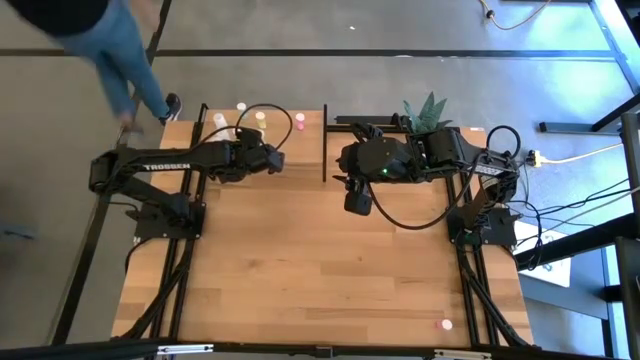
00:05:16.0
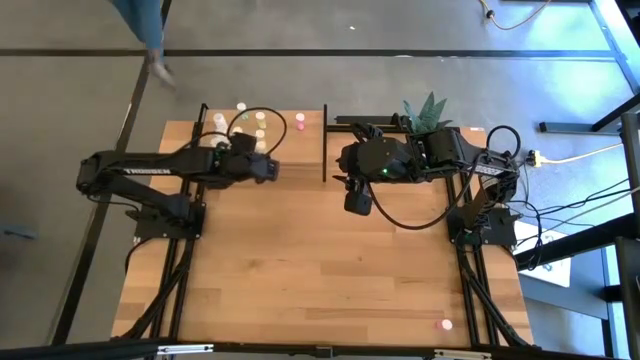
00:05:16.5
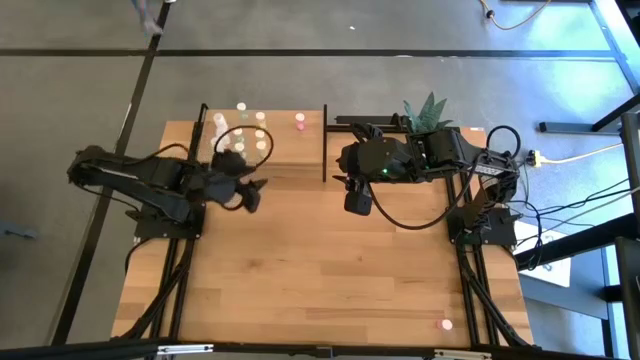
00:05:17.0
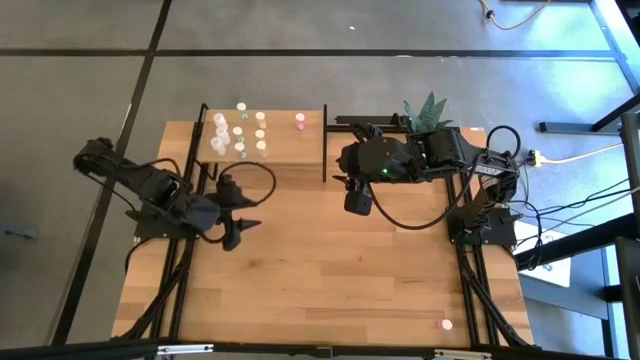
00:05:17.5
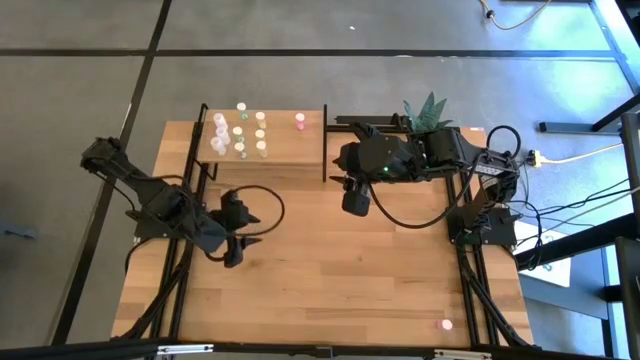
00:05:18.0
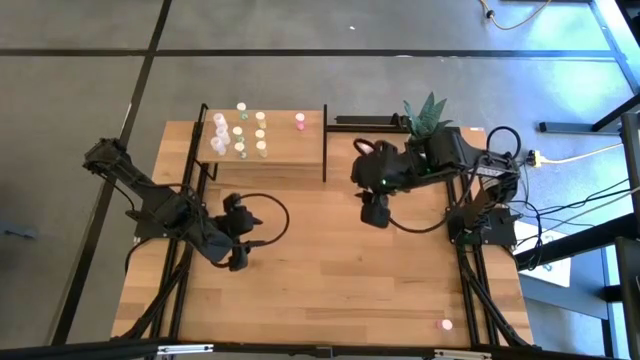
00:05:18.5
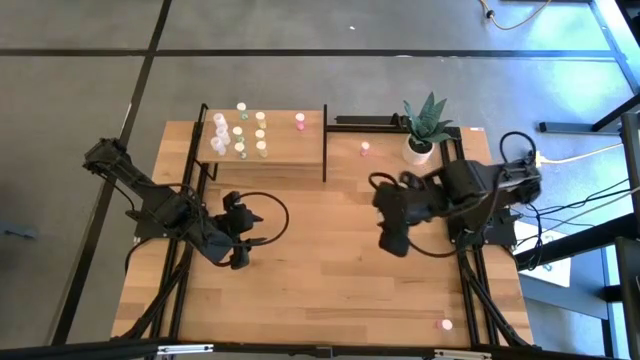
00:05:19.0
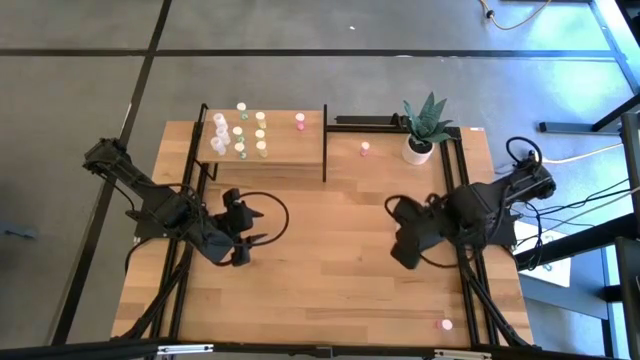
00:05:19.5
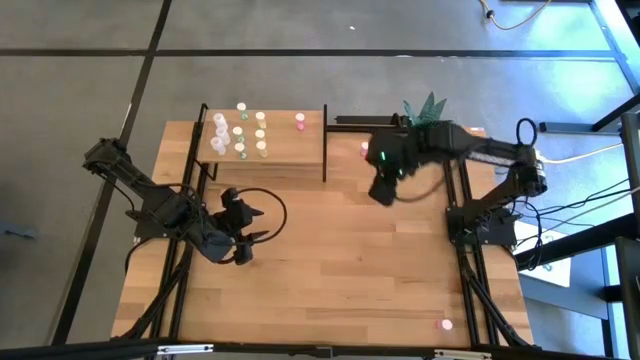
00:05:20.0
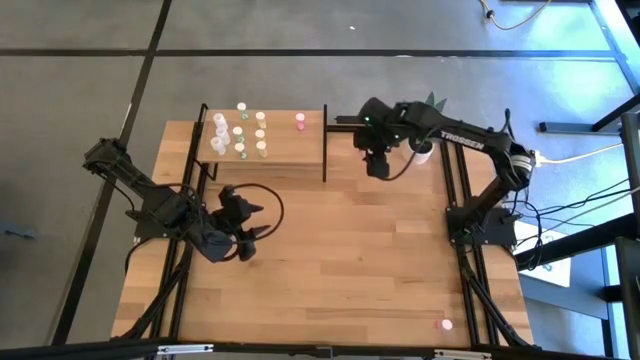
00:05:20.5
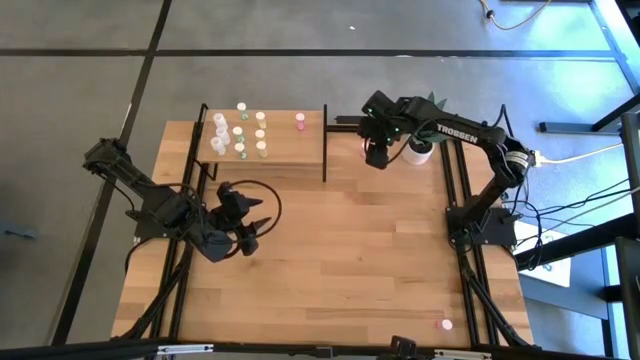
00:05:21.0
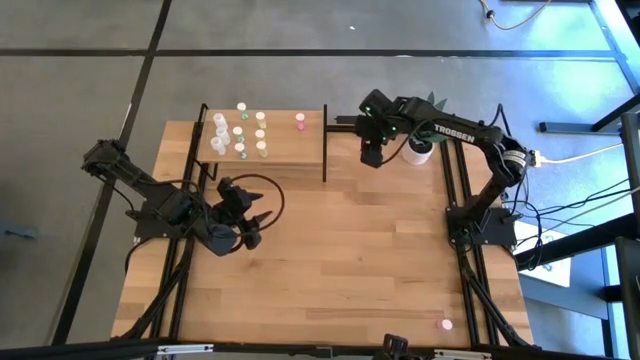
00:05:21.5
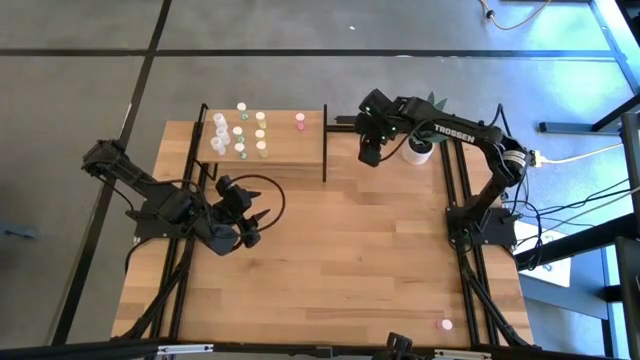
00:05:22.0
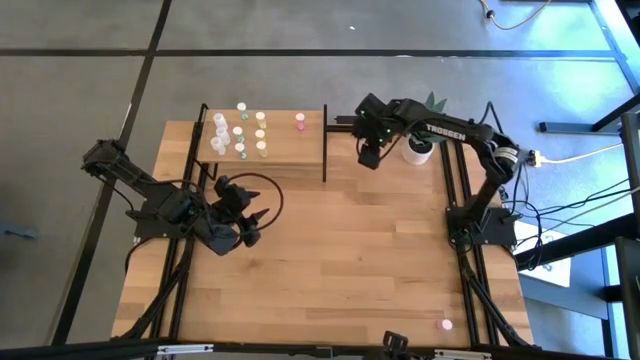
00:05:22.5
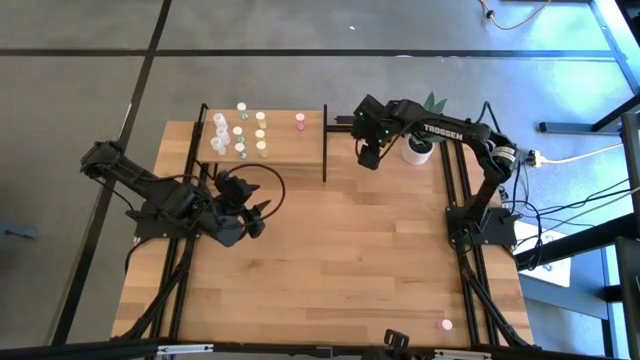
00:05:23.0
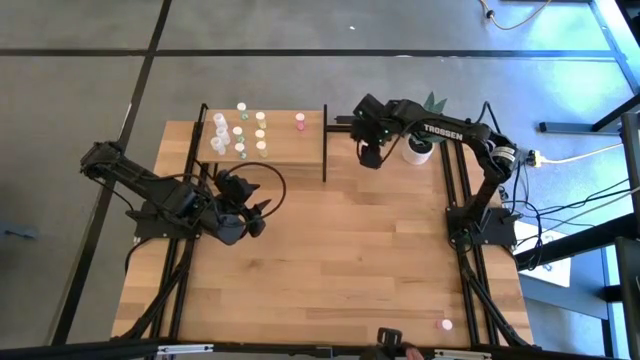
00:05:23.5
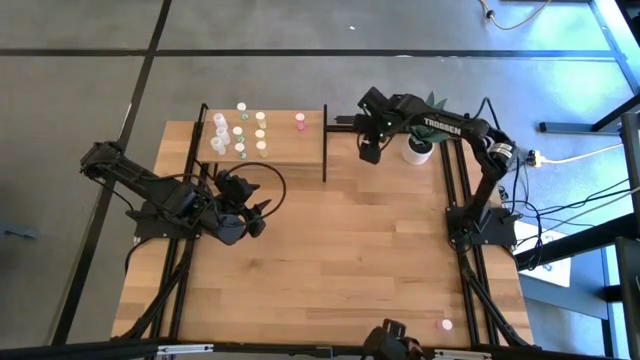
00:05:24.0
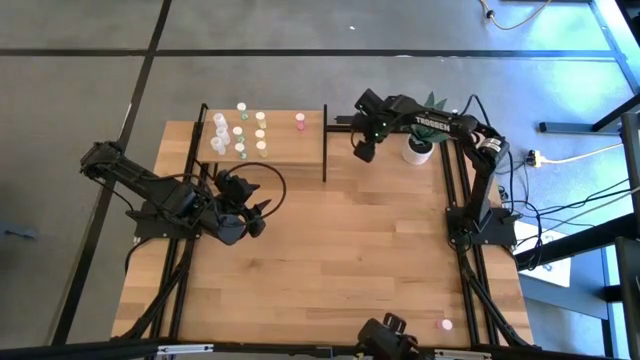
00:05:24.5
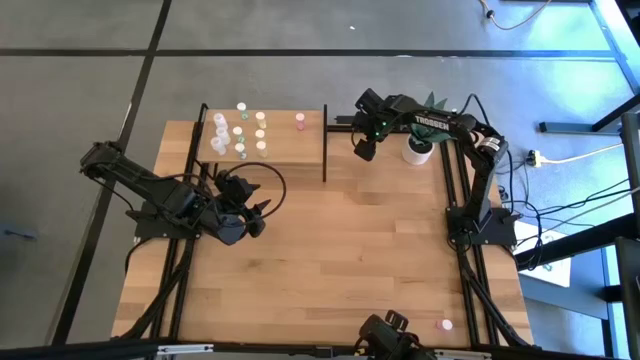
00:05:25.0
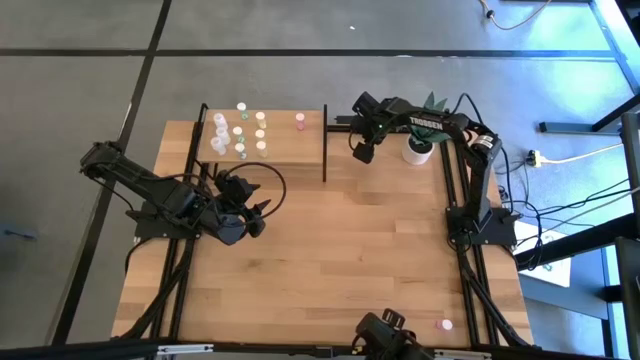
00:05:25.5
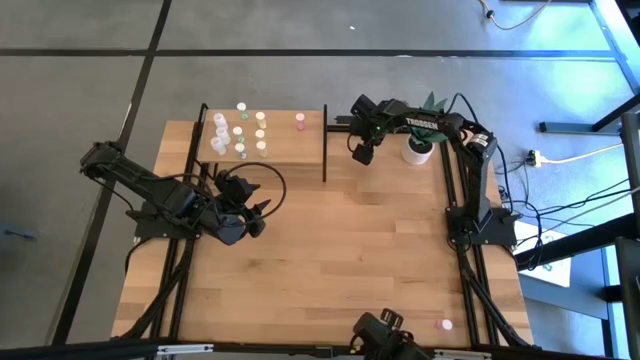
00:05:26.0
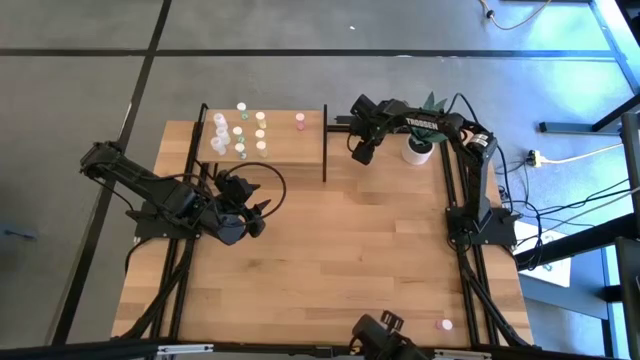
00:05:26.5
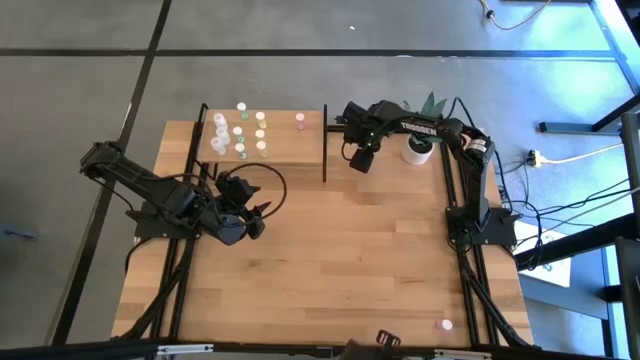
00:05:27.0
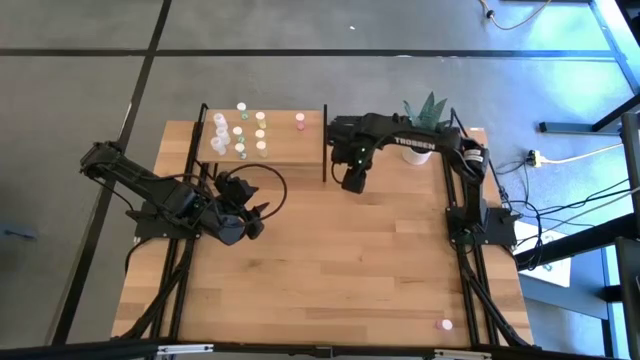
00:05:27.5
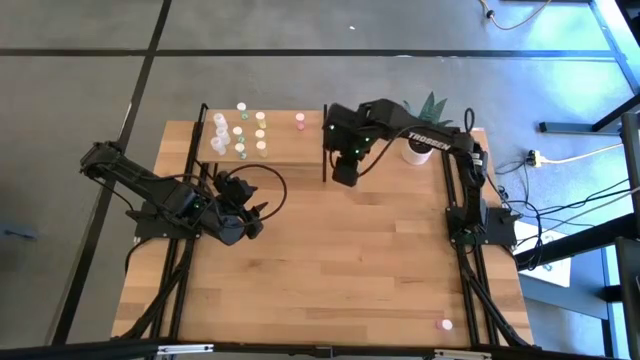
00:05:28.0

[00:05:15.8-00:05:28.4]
Task: Pick and place medicine bottles onto shelf by color
Put the top pink pill bottle aligned with the other pink pill bottle on the shelf

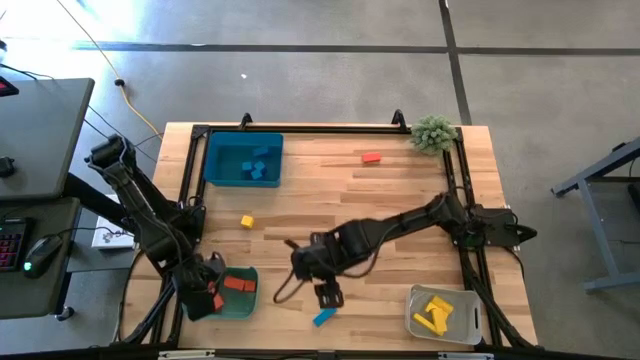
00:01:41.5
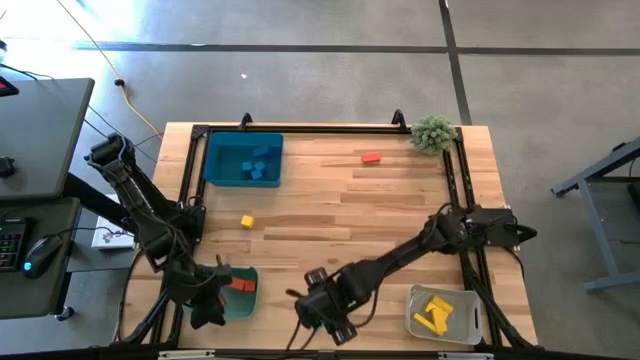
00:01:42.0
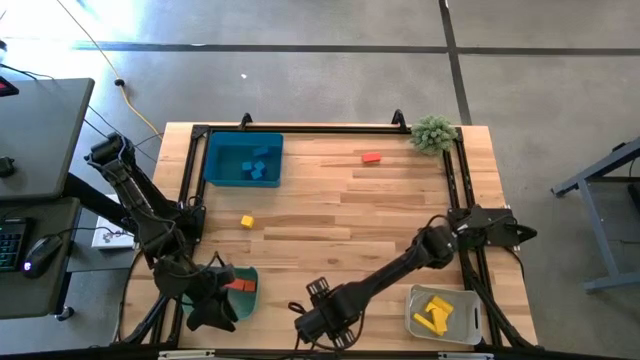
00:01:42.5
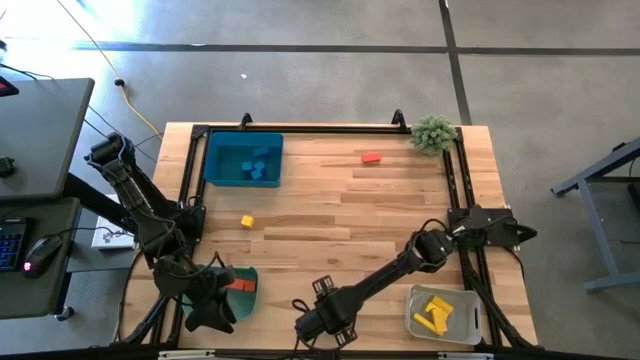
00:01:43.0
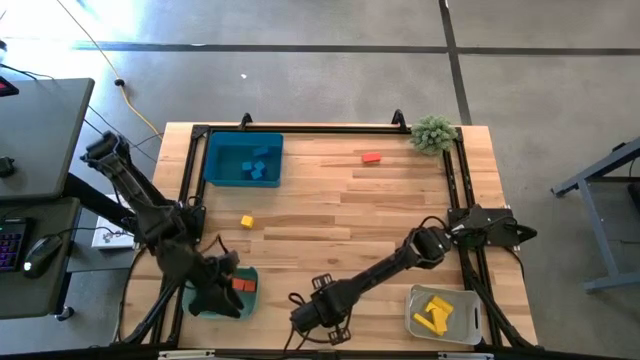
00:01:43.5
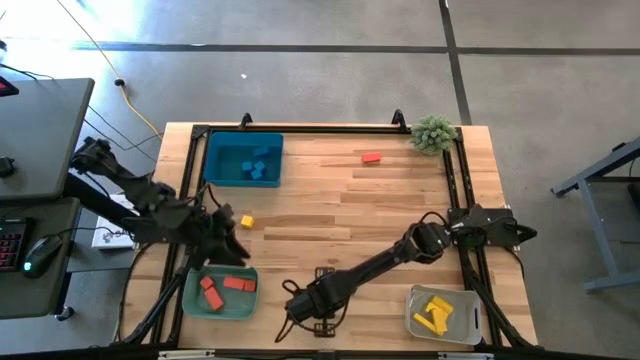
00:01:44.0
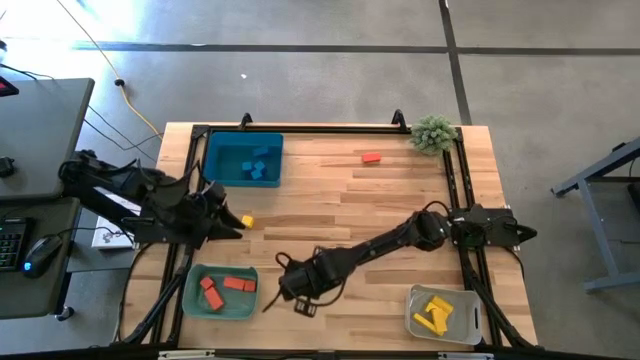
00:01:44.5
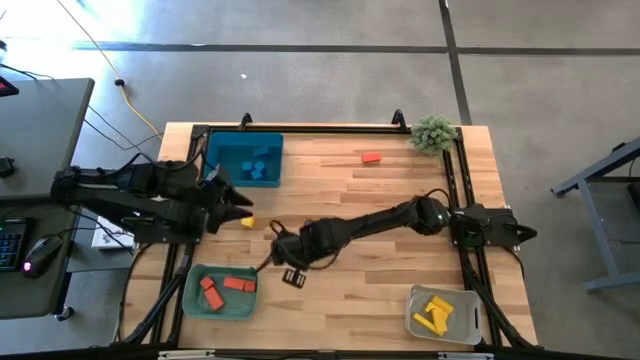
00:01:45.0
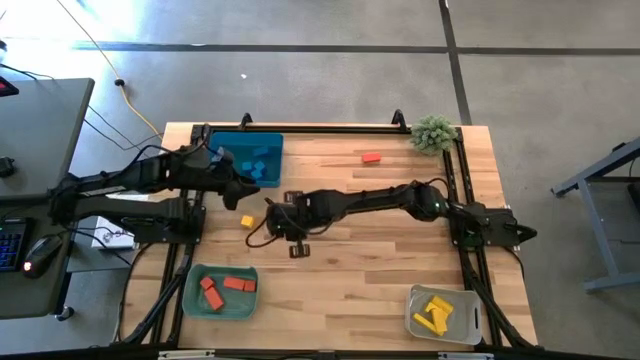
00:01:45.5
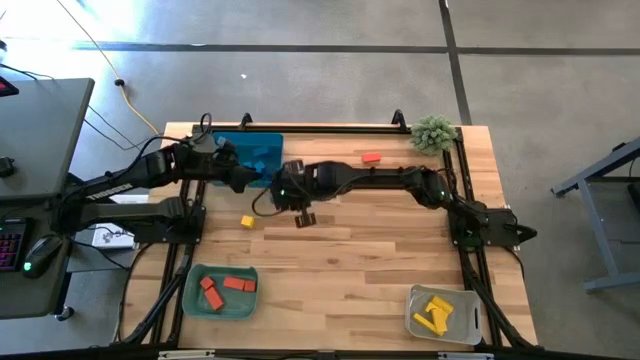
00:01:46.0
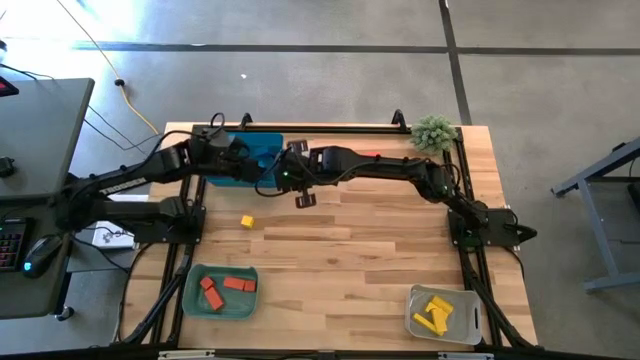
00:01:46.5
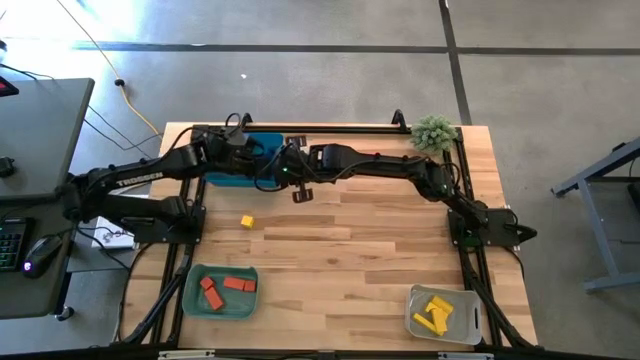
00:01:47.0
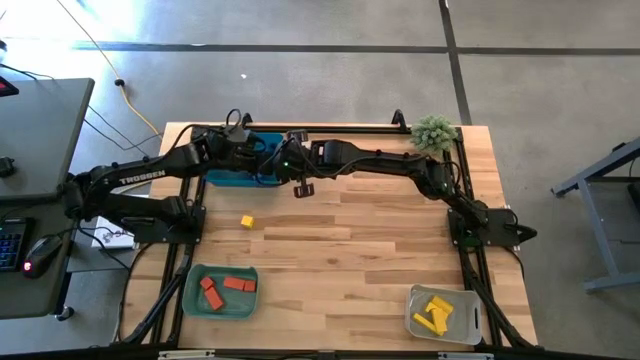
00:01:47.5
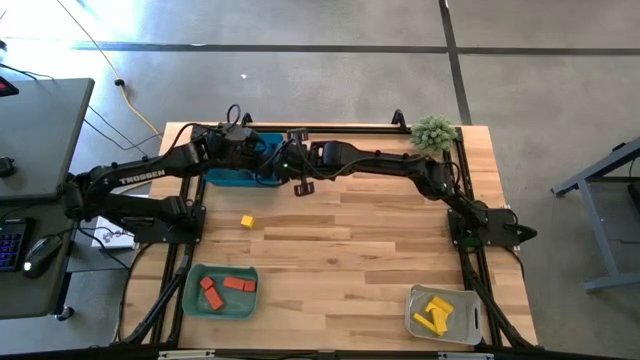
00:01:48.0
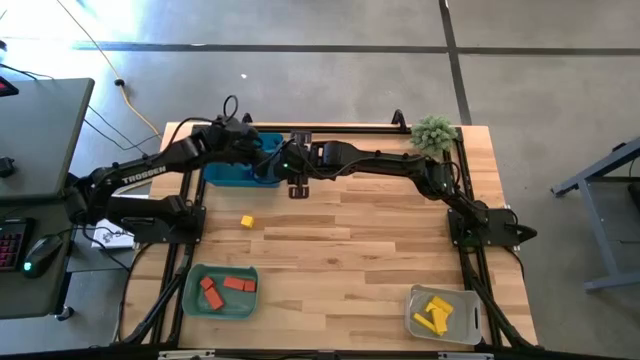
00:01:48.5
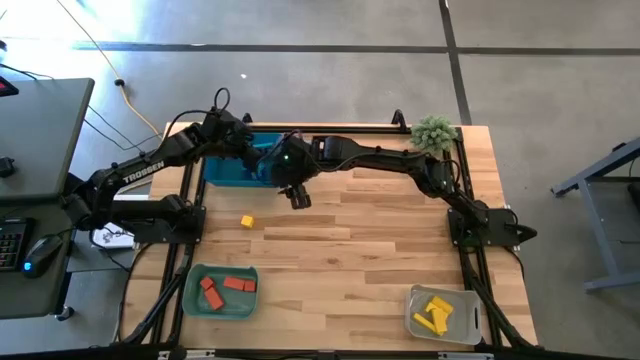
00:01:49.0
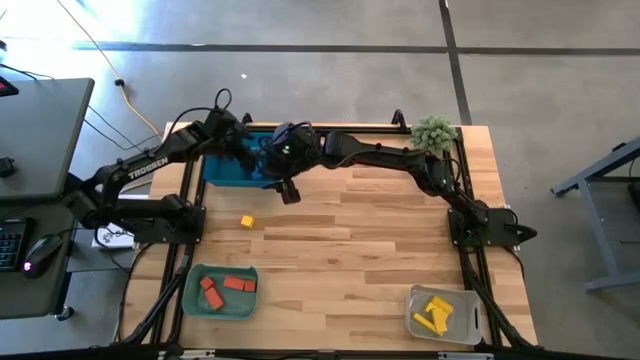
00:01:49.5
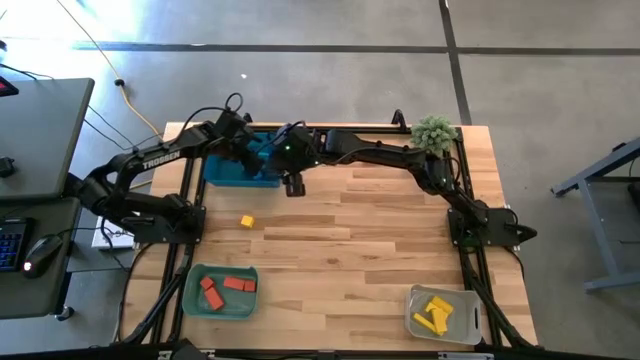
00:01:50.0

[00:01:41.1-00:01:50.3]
Task: Sort & place blocks by color
Put the blue block into the blue bin
